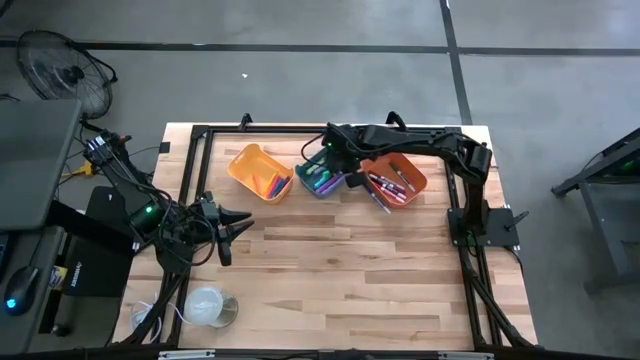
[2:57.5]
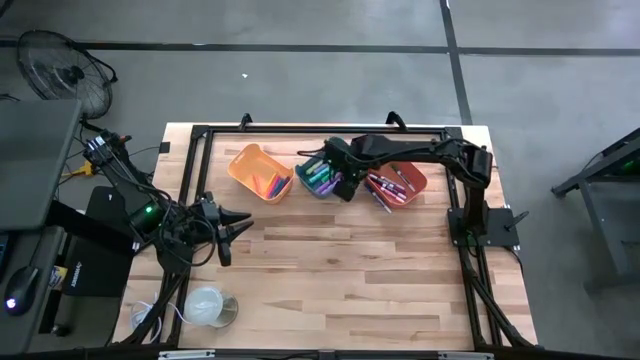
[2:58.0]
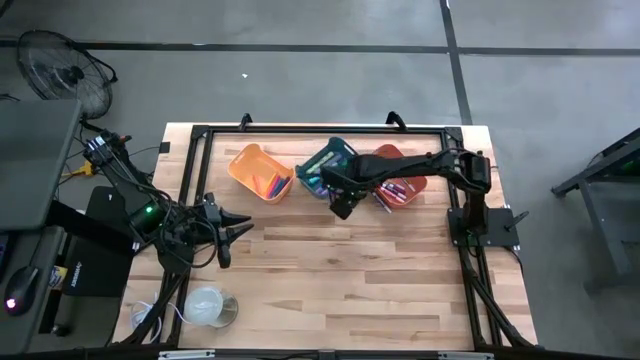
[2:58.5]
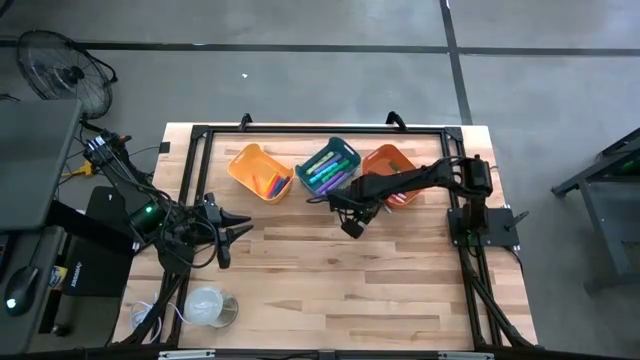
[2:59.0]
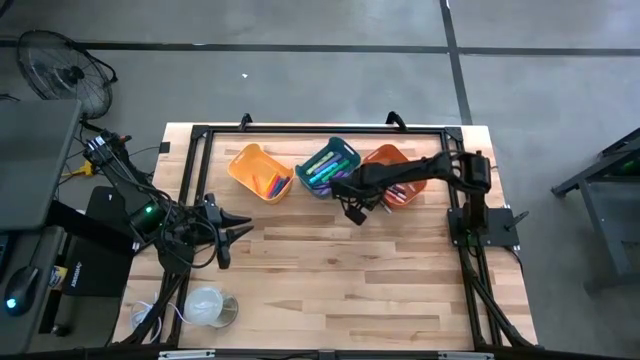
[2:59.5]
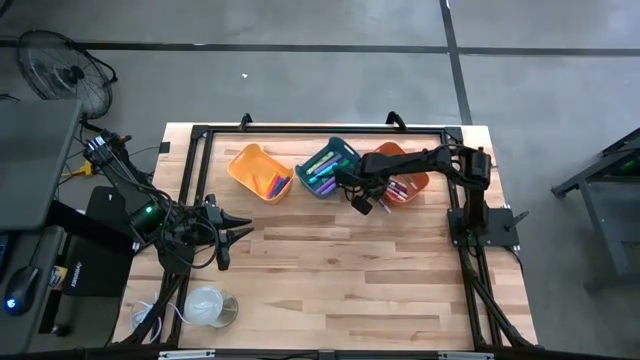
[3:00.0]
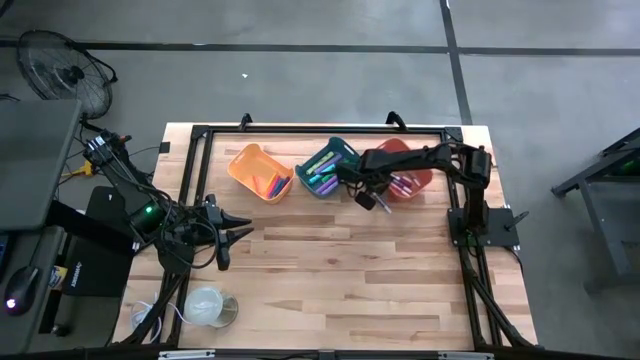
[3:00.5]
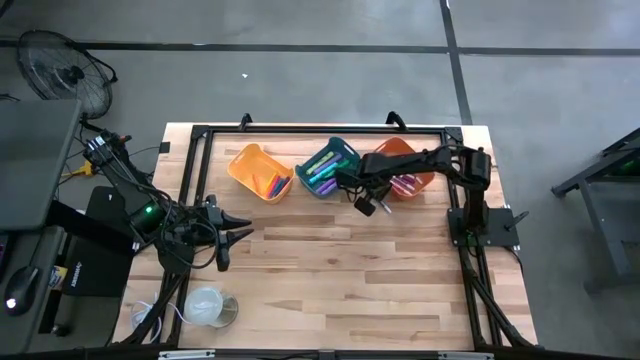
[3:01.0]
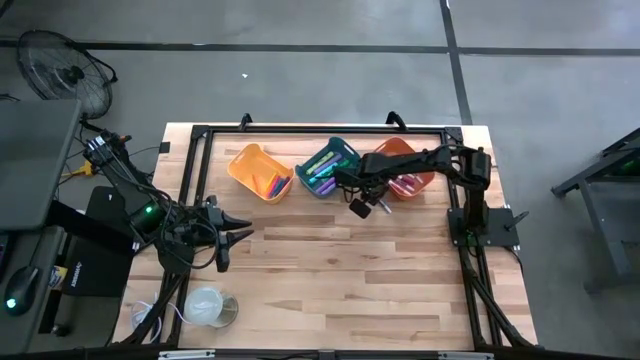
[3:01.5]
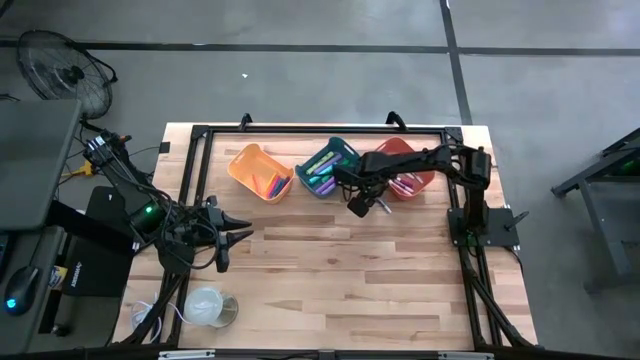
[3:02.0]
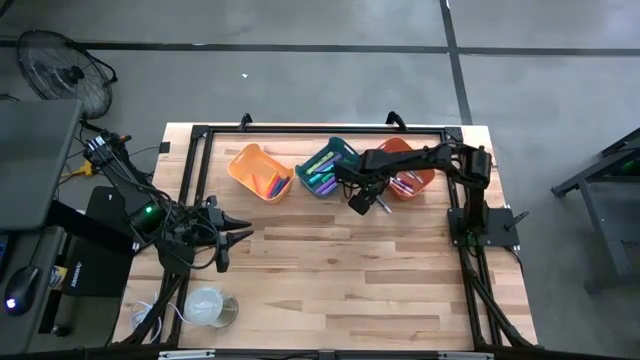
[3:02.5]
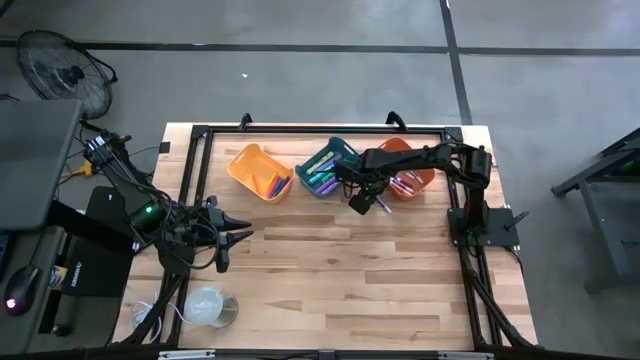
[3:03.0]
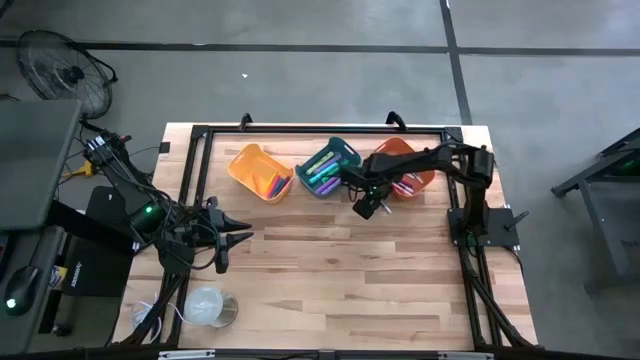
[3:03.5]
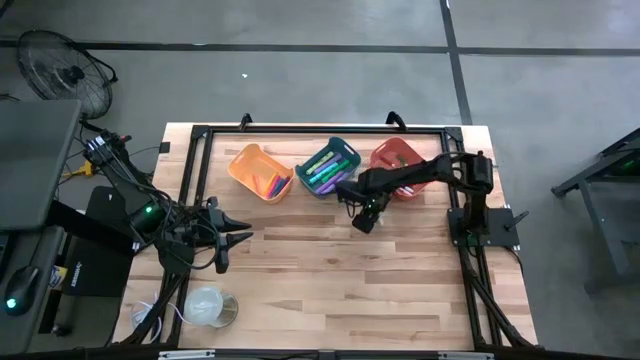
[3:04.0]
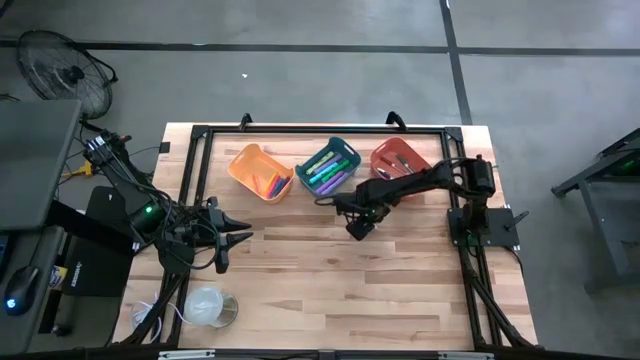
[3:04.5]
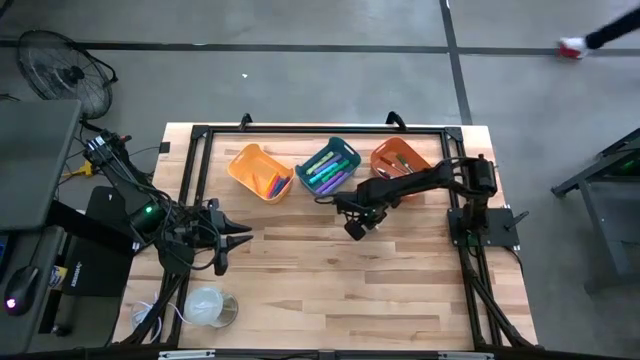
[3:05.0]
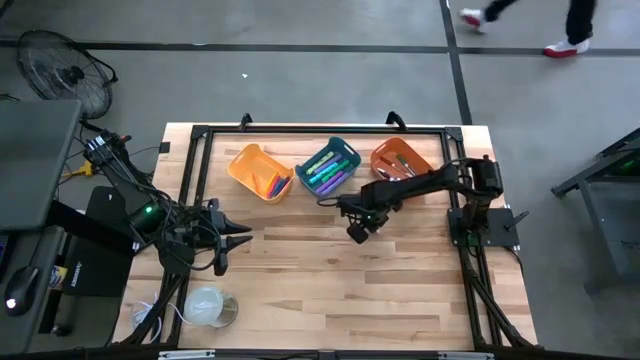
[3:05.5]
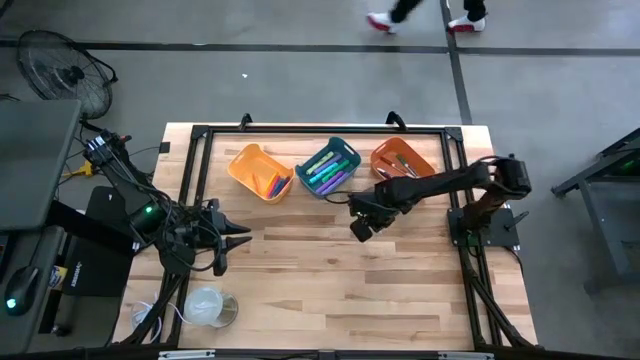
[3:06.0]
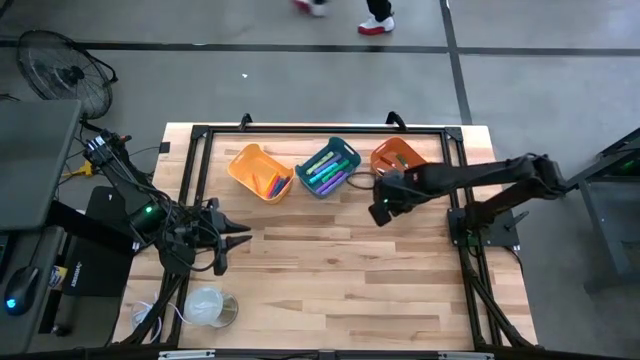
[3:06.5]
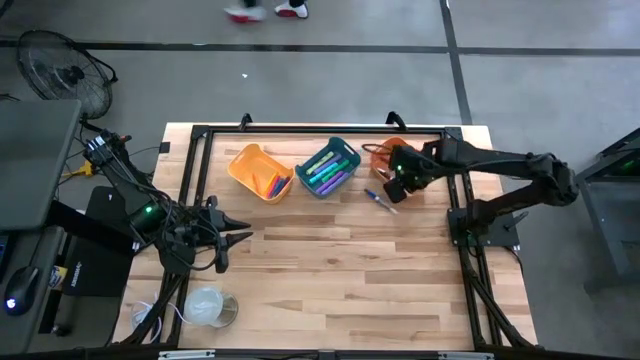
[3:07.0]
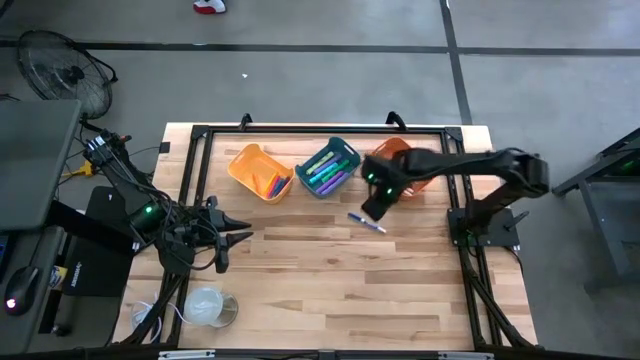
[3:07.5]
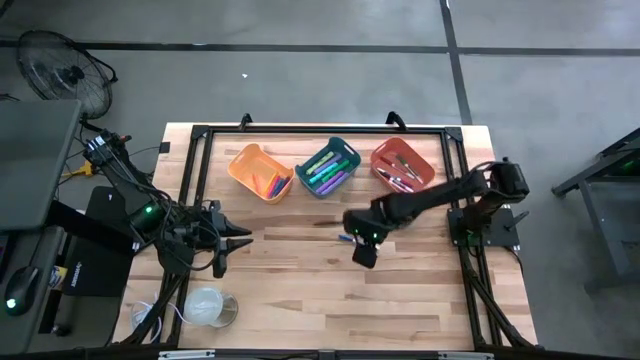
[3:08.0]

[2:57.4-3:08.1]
Task: Pick & Place Markers
Put the blue marker pen into the orange bin

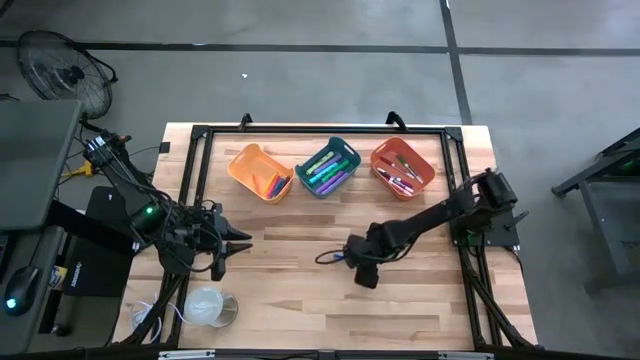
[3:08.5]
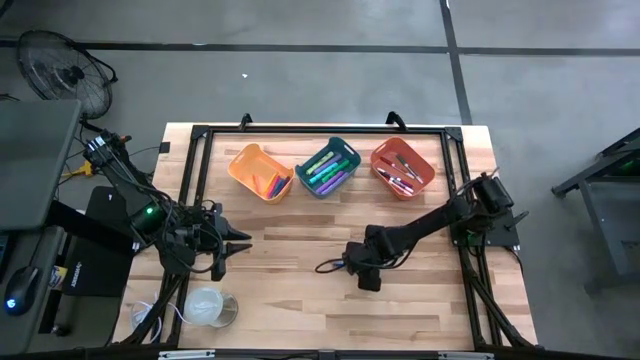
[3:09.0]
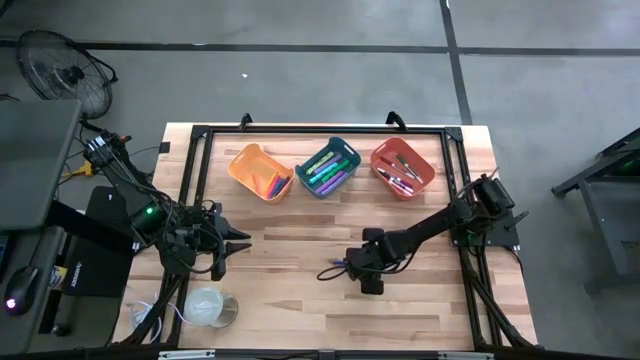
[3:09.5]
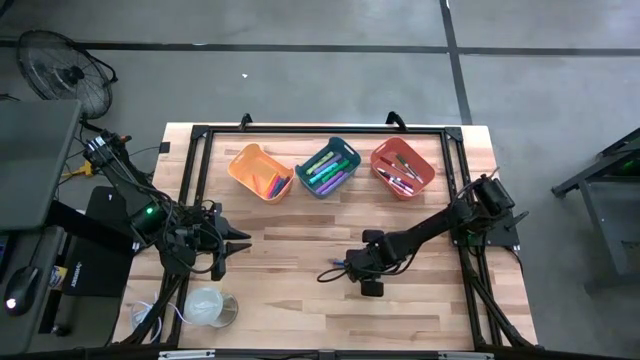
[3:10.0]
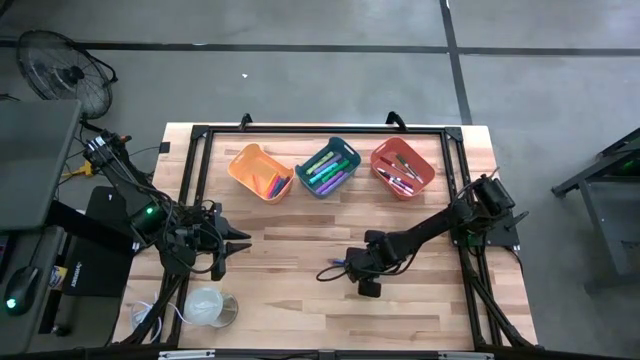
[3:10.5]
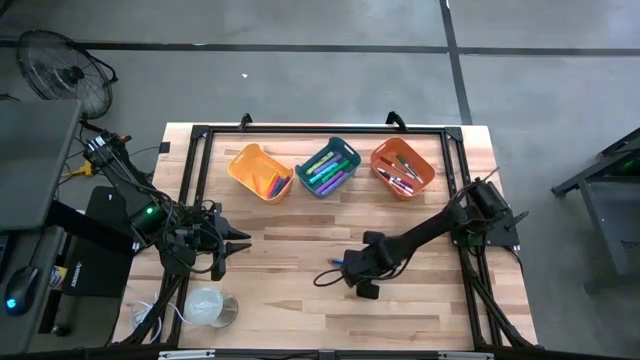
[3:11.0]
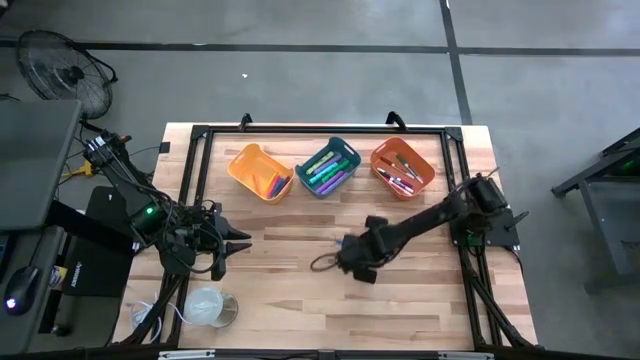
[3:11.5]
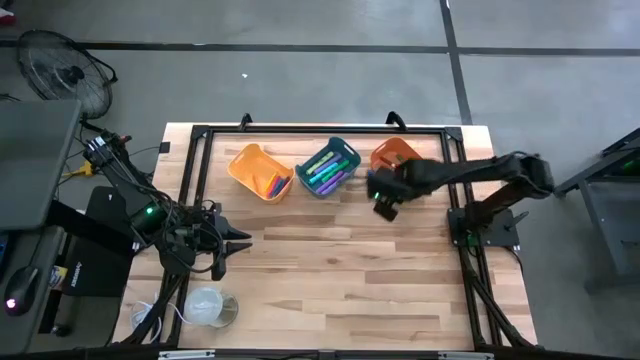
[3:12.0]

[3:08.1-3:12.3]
Put the blue marker pen into the orange bin

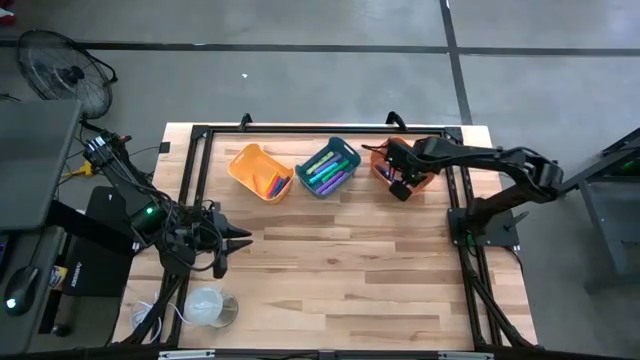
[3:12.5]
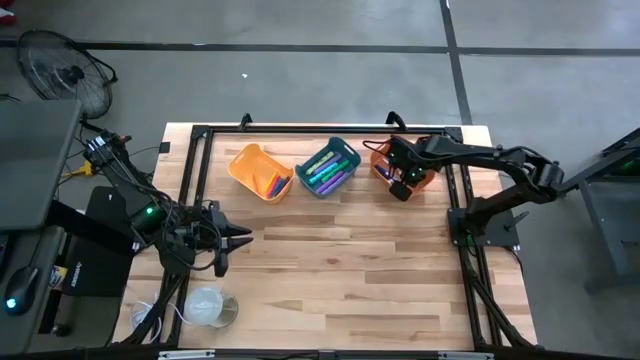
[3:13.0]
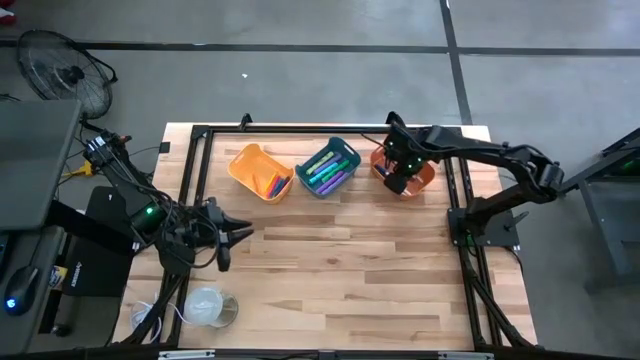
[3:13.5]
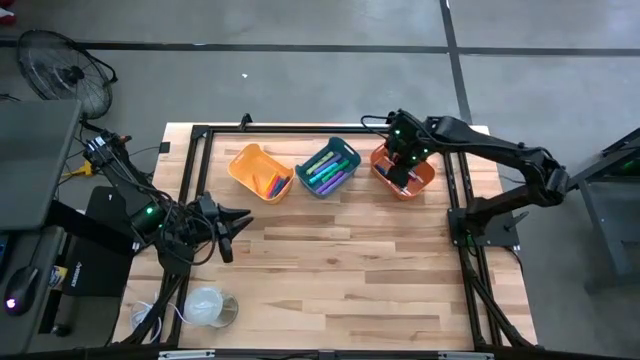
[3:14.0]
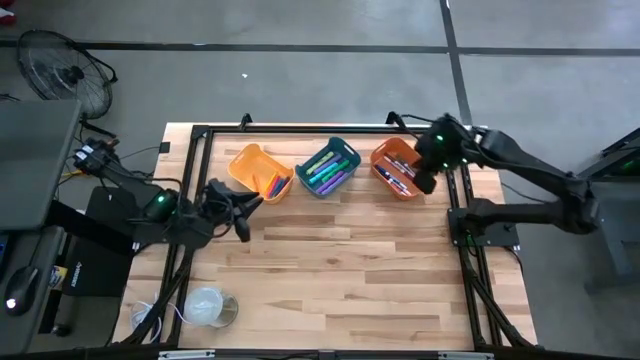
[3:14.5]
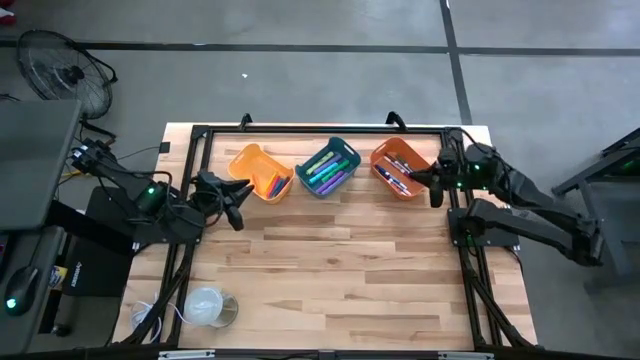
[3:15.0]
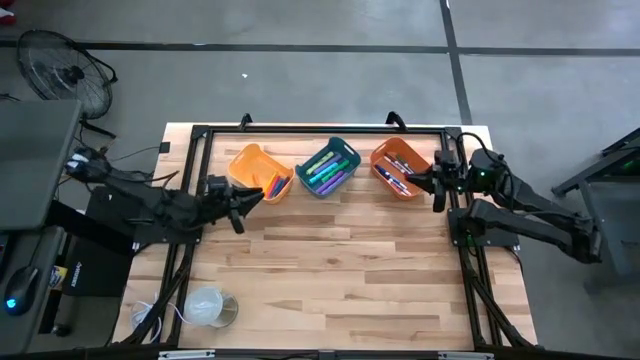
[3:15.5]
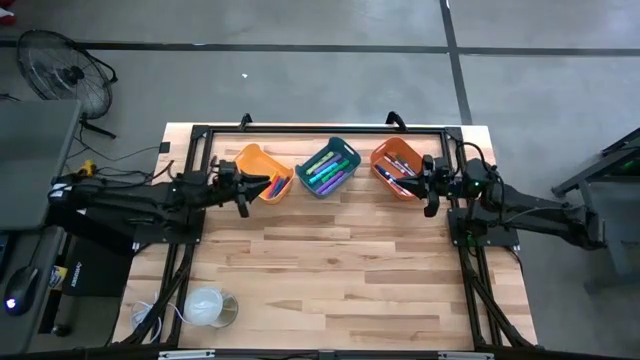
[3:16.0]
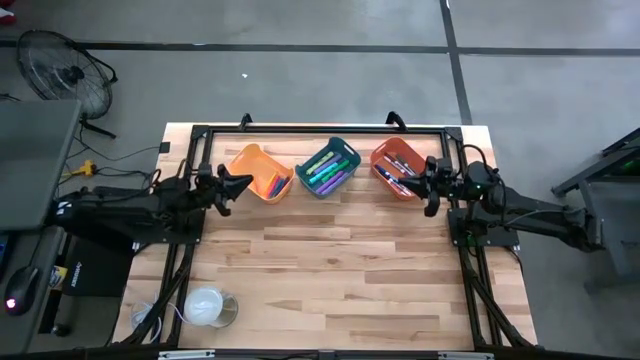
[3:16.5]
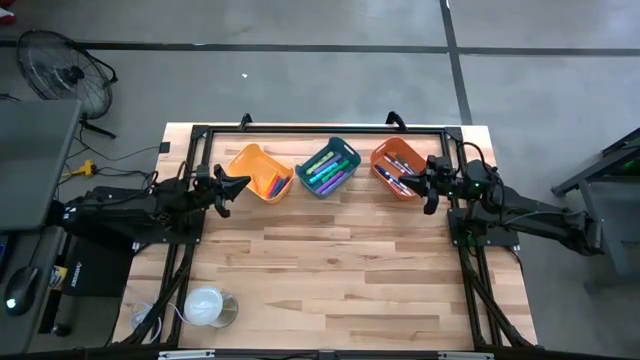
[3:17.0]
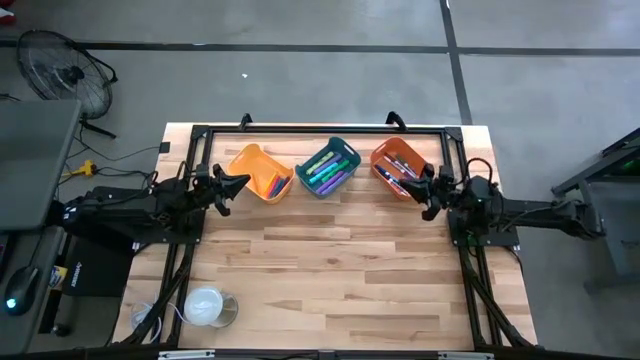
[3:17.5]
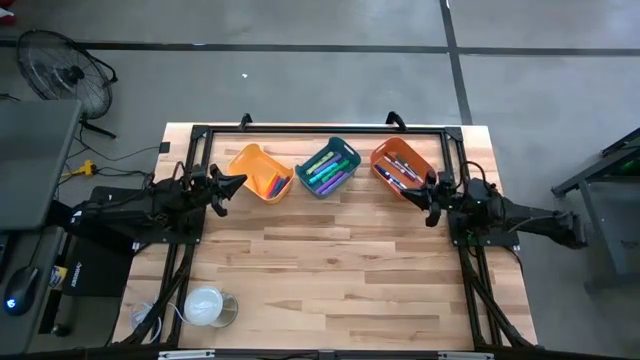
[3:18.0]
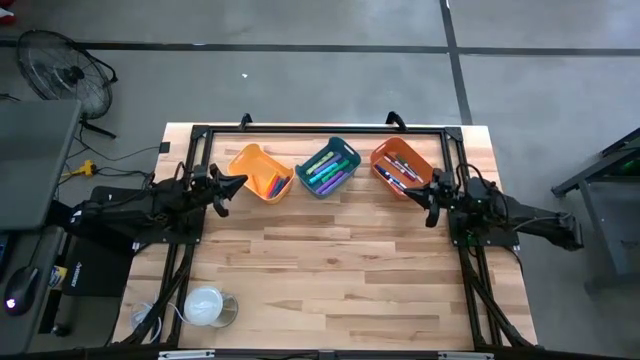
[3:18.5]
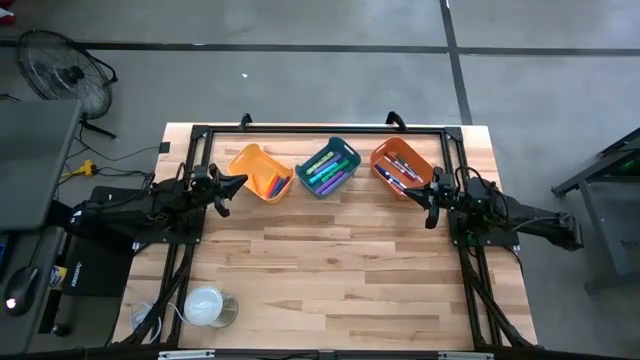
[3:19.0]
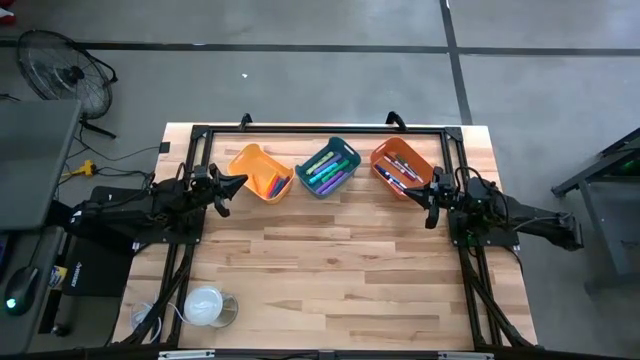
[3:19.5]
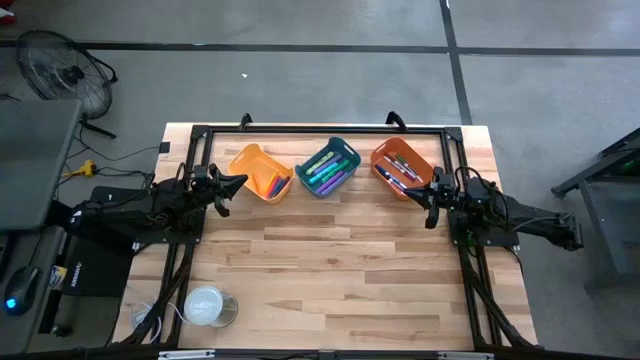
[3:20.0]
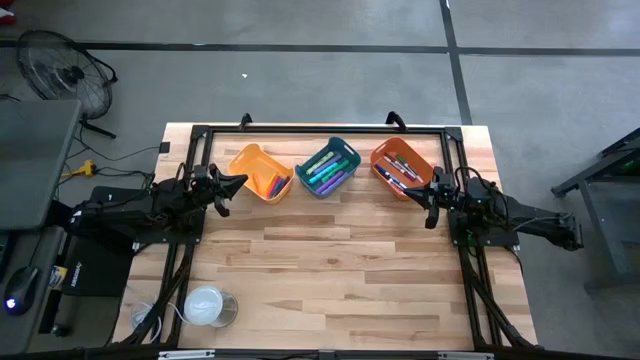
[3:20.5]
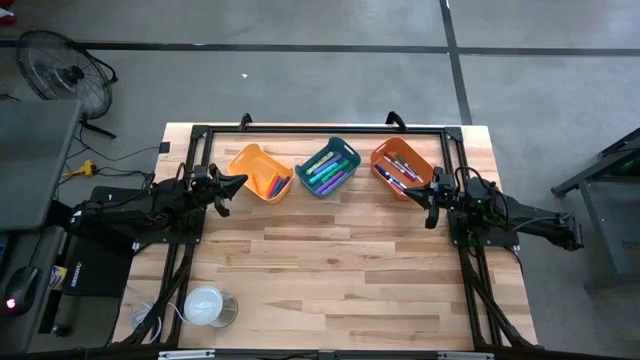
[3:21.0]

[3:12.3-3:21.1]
Return to Home Position
